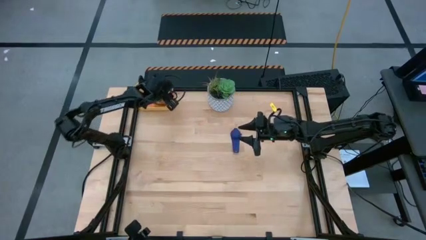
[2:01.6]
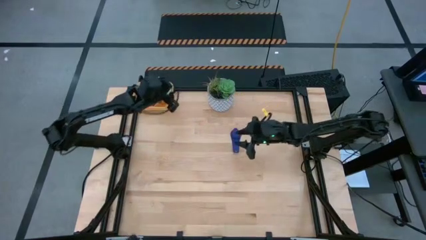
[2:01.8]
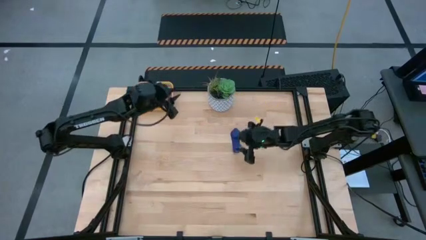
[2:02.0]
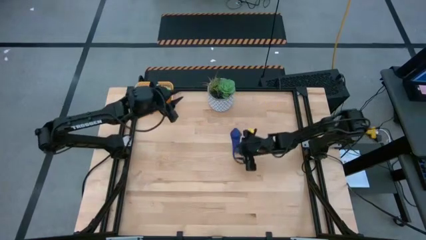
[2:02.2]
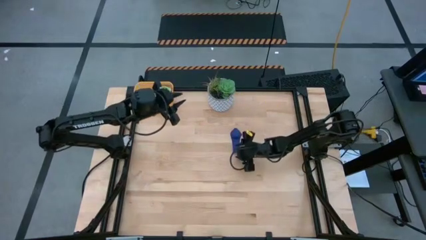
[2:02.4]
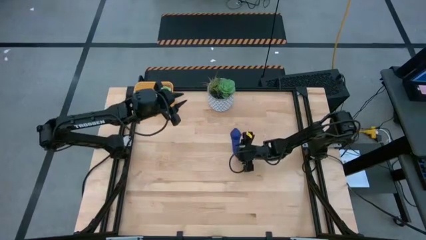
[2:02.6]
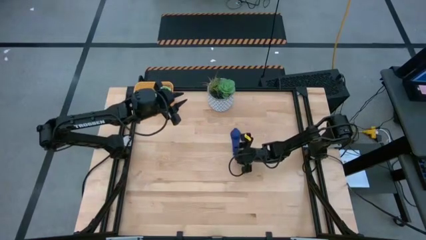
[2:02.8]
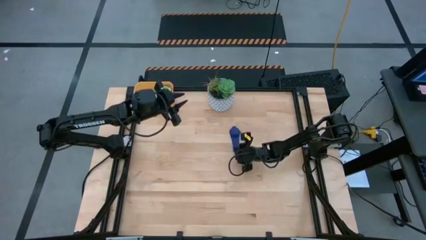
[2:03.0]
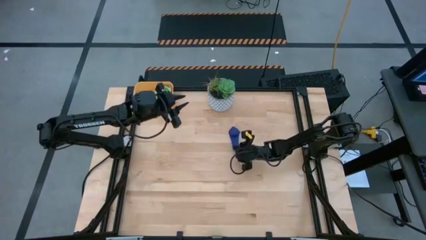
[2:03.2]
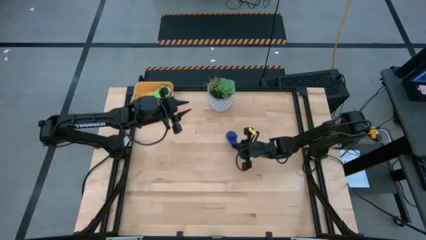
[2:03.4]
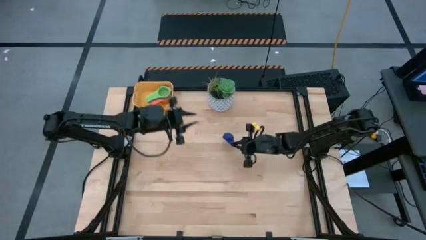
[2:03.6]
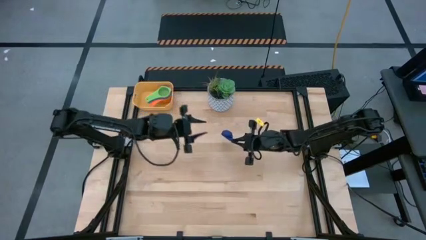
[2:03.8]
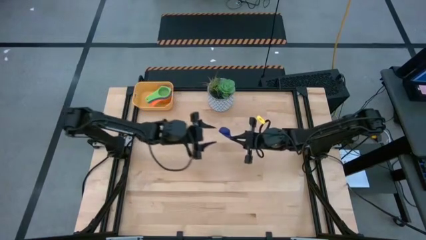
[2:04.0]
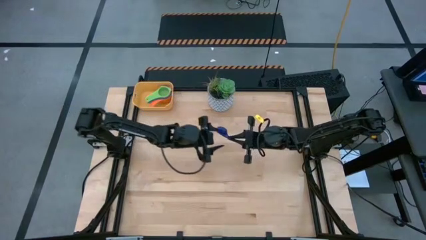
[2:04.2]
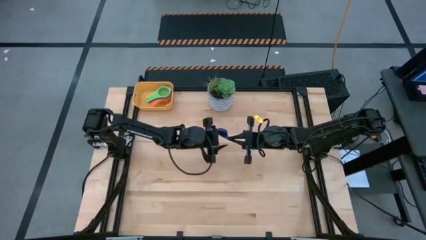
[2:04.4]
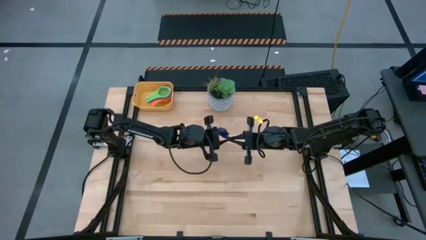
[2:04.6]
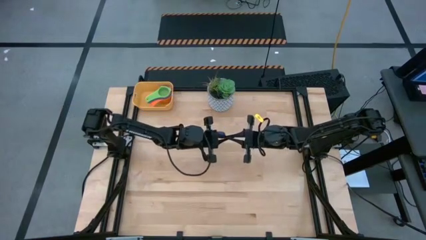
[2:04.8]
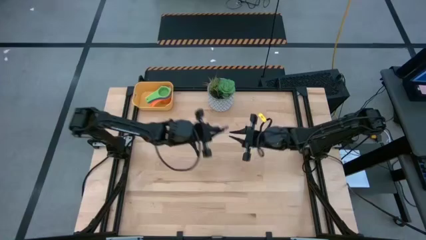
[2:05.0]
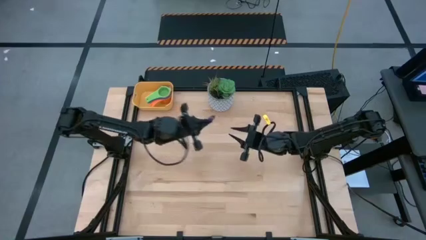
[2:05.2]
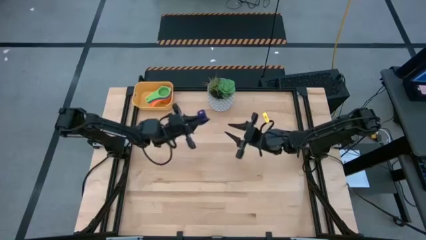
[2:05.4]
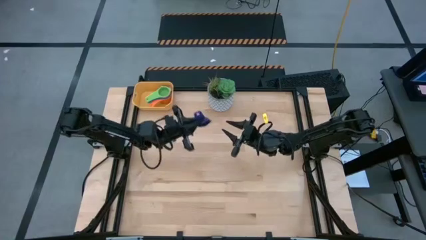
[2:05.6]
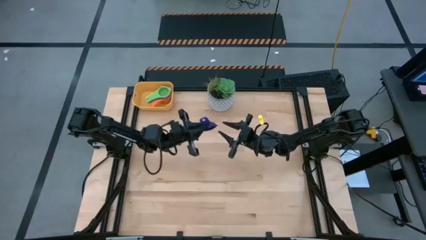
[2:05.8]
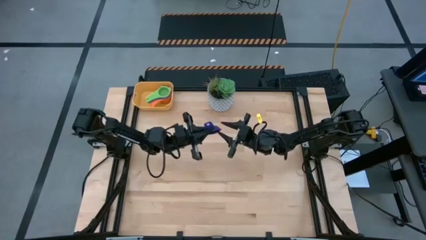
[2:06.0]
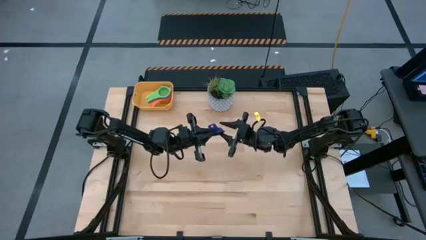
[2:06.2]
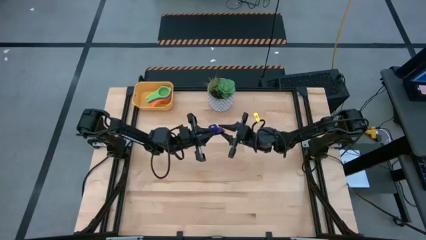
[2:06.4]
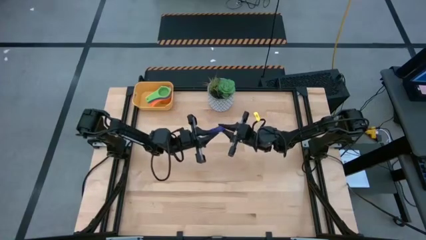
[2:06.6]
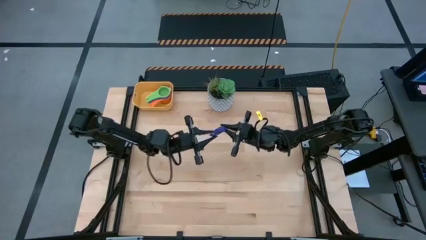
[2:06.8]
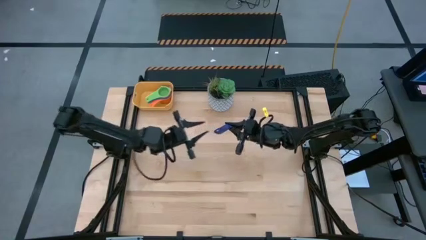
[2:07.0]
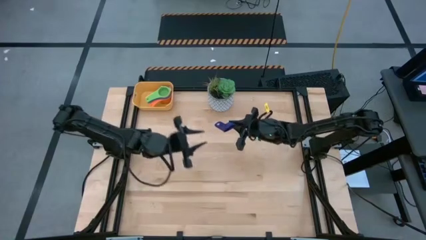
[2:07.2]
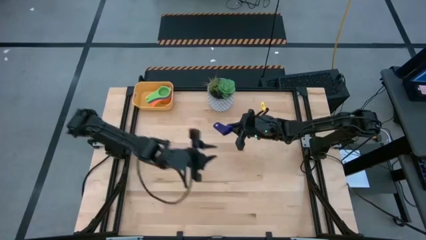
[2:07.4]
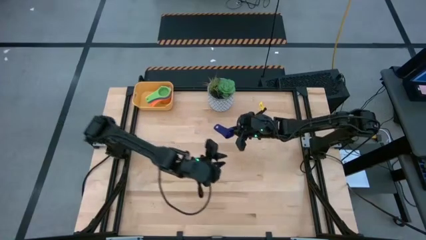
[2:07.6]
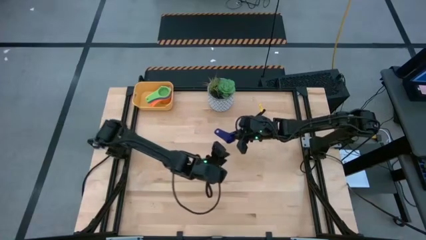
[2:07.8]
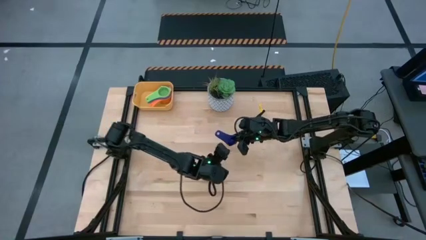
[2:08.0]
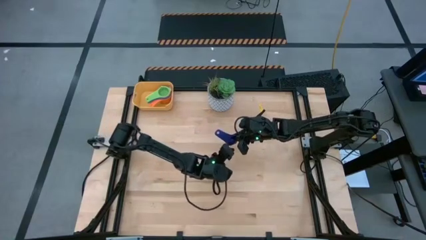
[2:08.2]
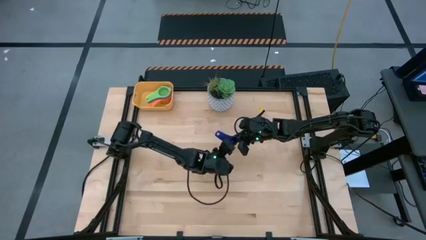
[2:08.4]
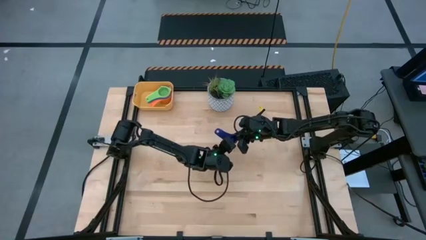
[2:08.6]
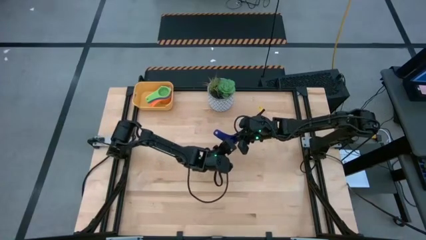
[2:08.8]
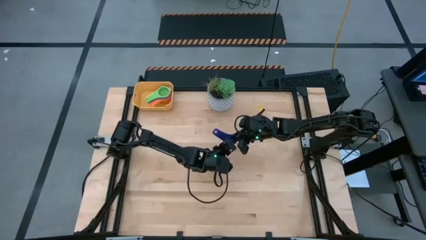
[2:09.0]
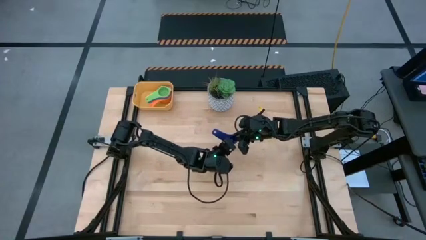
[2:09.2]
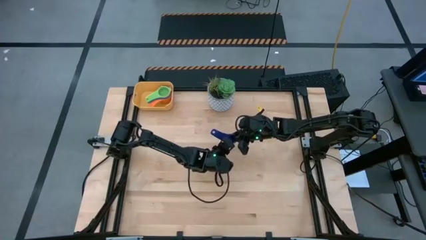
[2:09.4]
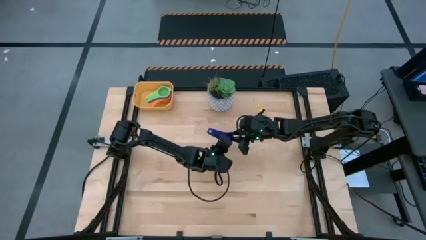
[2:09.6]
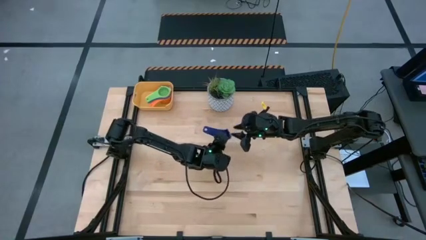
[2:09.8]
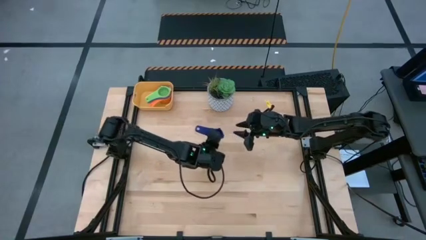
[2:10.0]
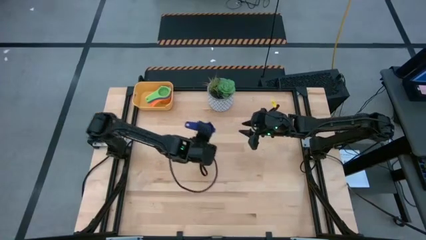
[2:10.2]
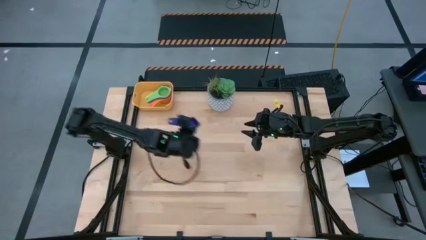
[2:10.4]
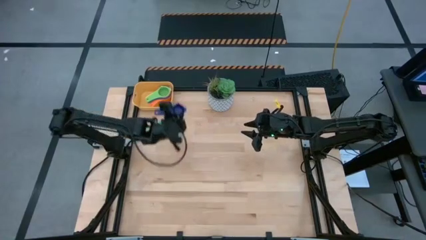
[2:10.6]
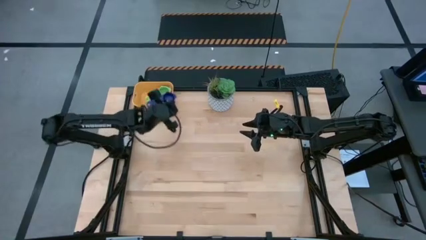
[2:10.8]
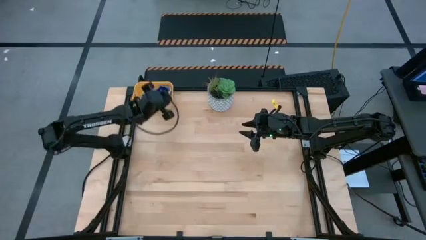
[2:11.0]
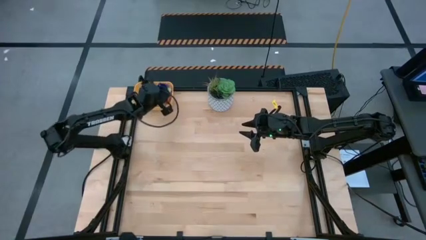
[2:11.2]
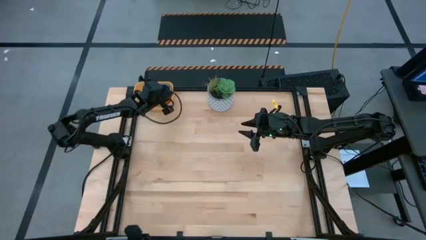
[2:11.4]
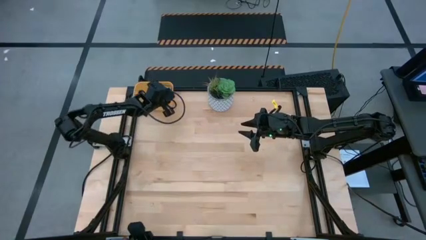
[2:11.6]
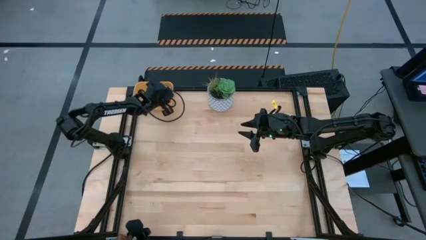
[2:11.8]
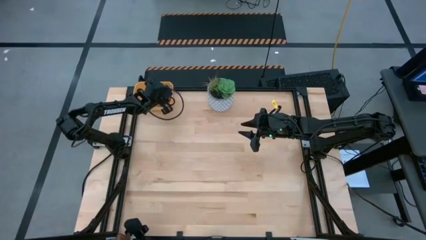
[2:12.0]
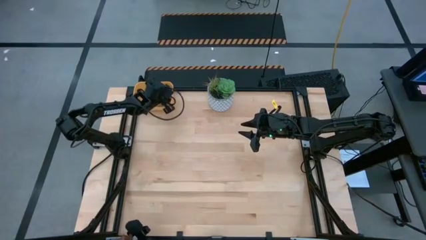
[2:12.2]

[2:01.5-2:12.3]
Task: Nest measuring cups in basket
Stack the violet measuring cup on top of the green measuring cup in the yellow bin
